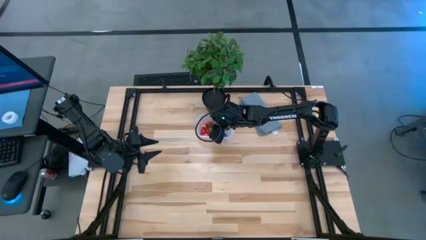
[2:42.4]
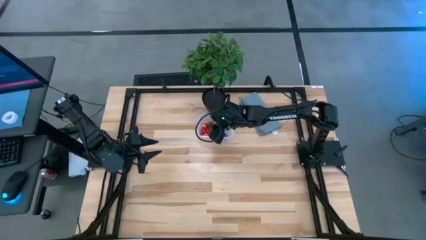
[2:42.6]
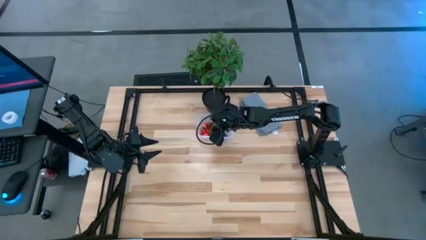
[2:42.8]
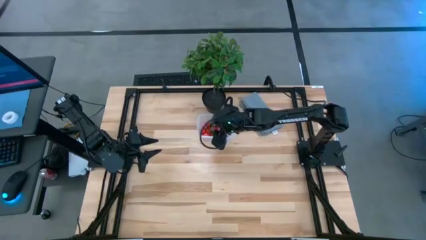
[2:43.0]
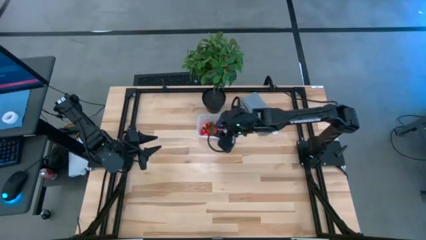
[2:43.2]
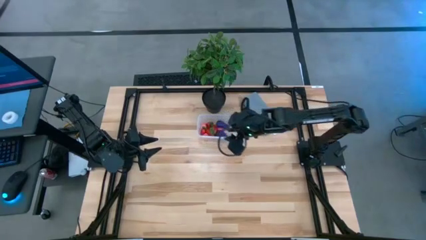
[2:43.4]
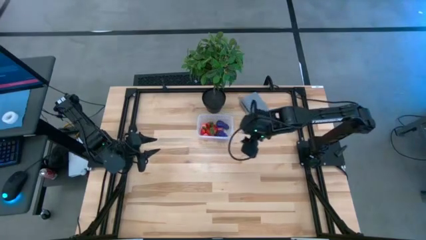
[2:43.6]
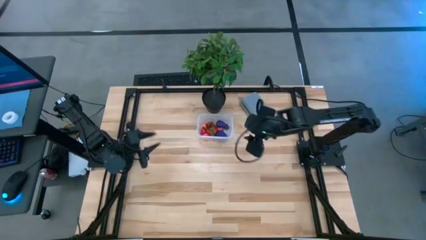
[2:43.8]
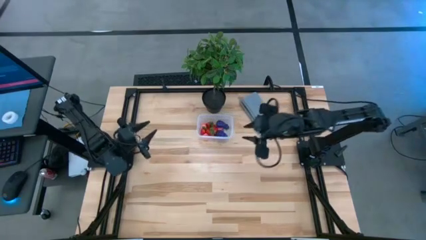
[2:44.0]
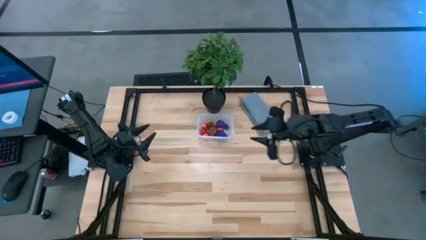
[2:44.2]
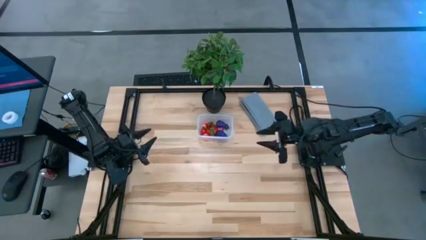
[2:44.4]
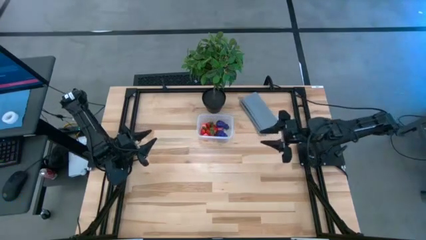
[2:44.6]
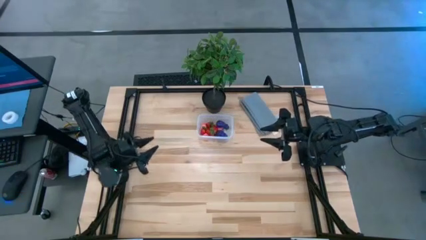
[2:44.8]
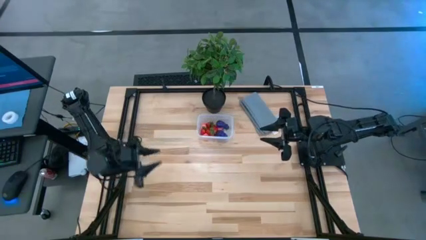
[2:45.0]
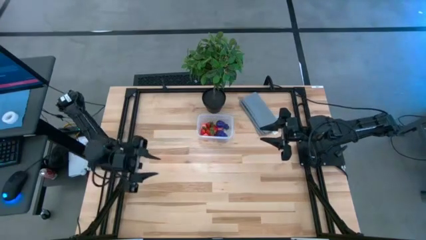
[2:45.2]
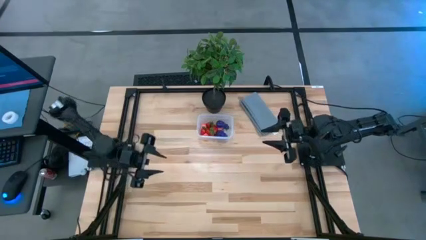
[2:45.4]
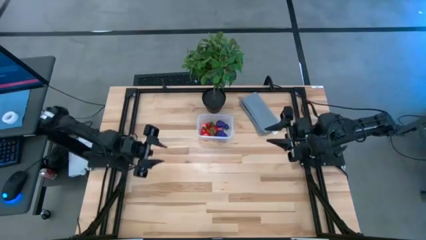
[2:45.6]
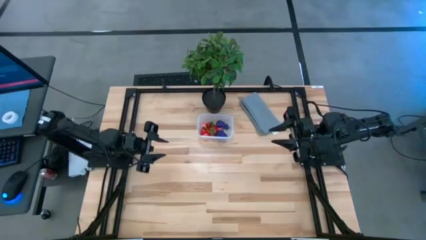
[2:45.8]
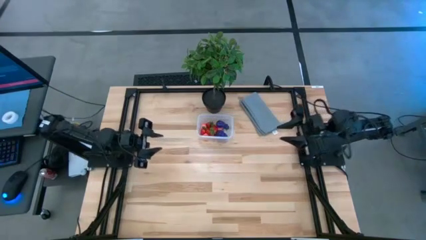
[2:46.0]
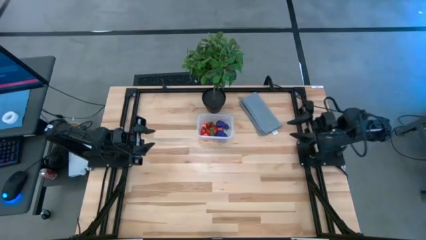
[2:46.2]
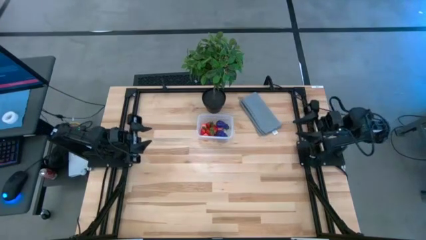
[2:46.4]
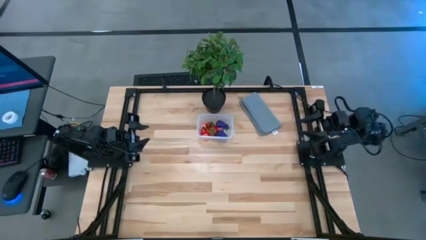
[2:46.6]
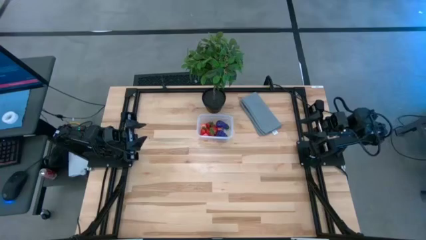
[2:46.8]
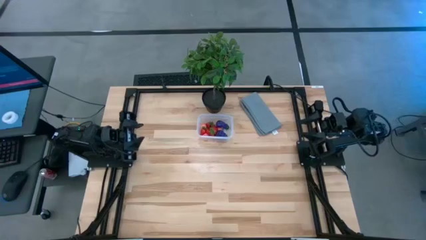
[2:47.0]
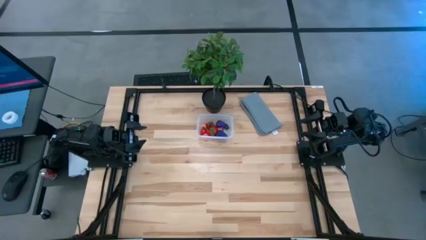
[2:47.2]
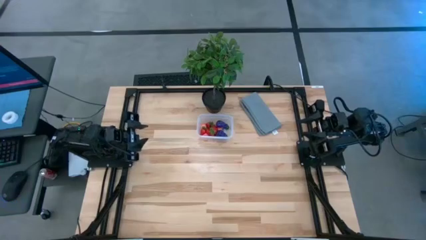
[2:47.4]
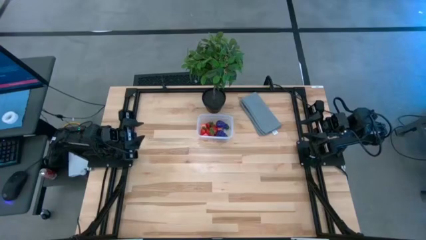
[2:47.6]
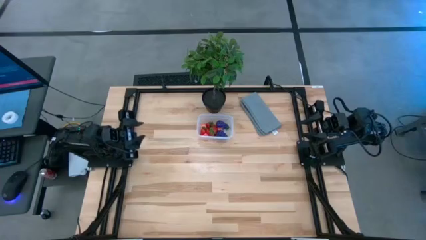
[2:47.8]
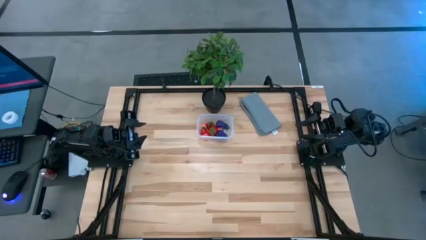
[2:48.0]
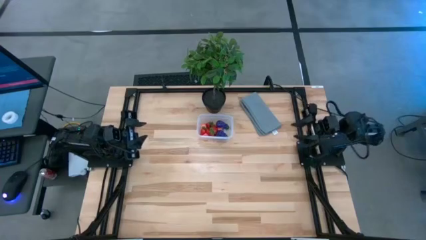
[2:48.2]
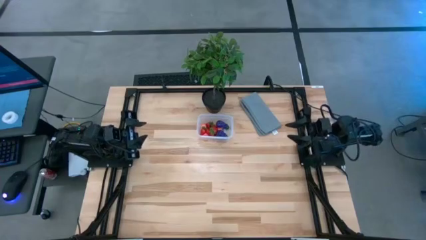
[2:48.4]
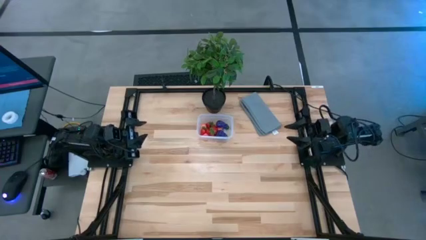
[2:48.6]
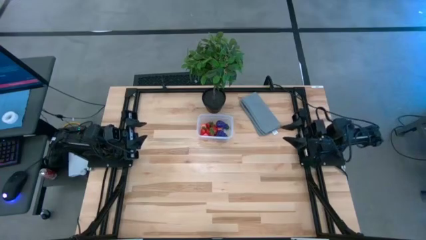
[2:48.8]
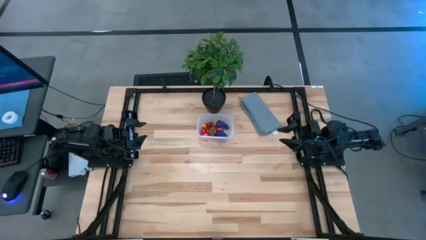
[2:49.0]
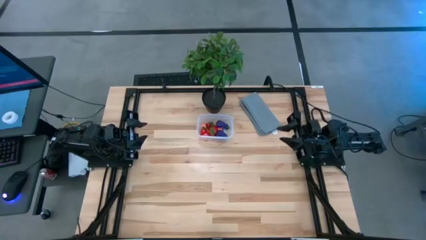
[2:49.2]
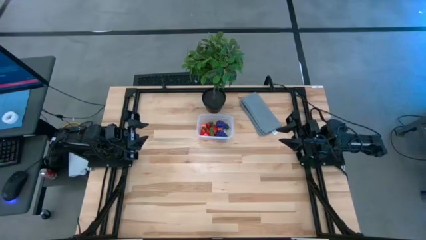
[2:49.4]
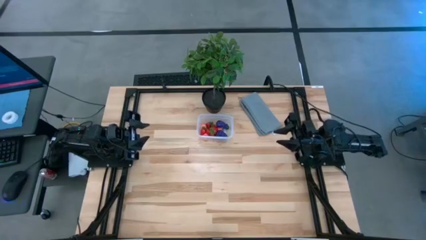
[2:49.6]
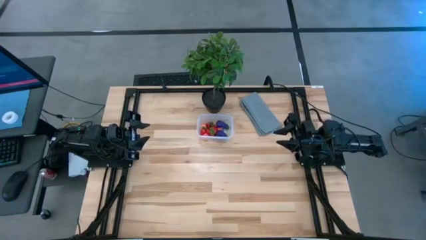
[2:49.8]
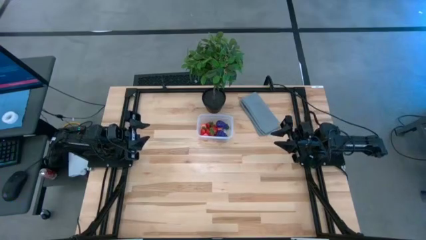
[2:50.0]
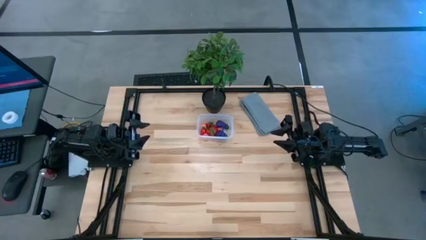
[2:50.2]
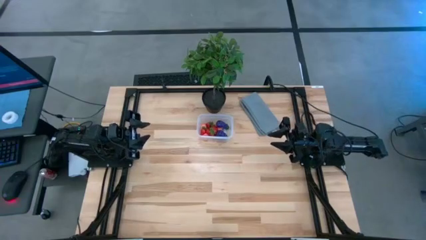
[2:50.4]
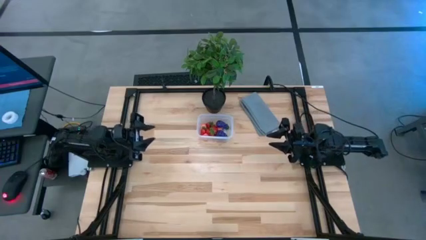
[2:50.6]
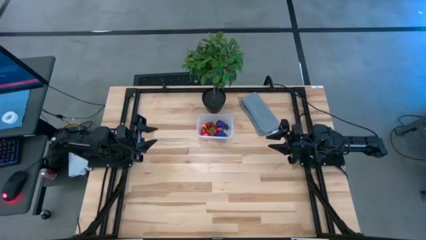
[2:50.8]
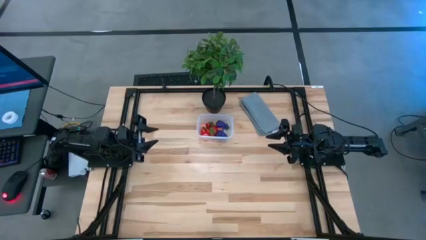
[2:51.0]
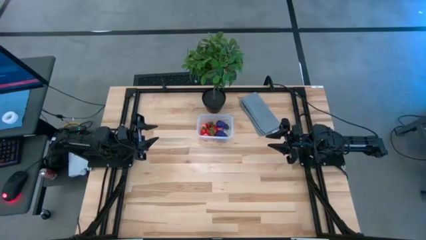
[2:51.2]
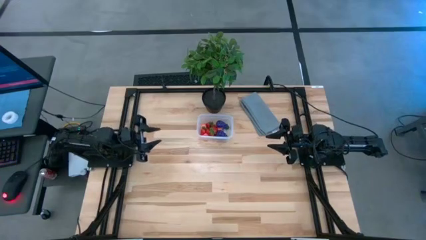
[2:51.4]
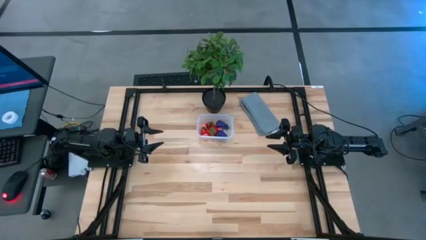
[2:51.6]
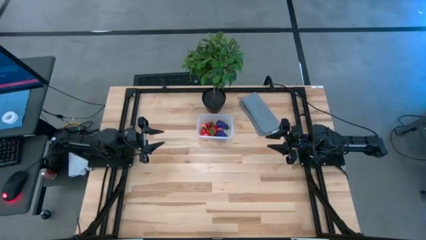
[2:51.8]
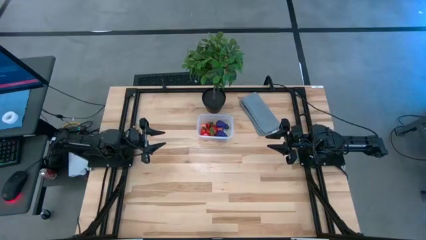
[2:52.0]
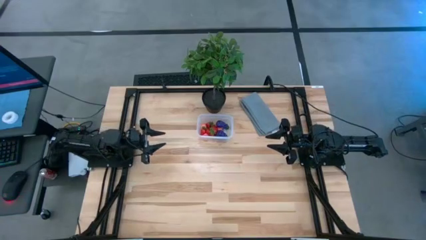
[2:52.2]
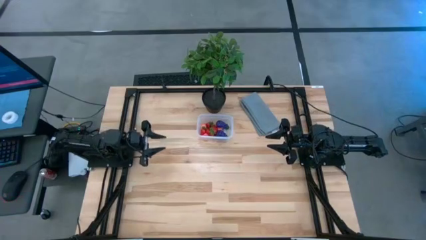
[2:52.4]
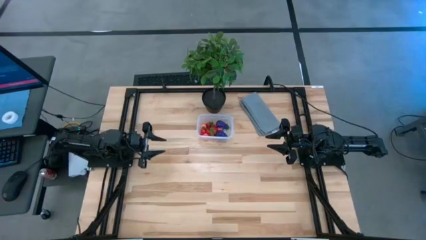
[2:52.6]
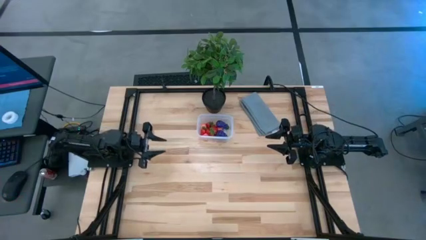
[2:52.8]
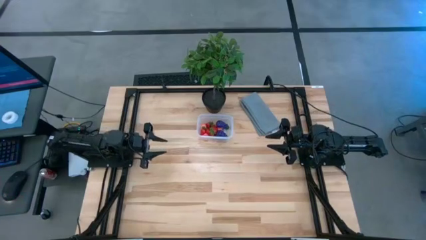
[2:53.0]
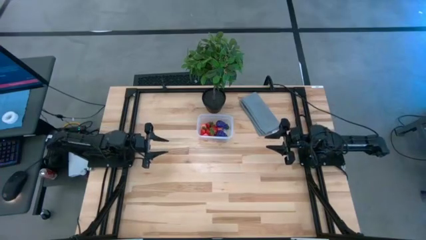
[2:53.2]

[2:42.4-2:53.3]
Task: Pick and placing Produce into tupperware
Return to Home Position

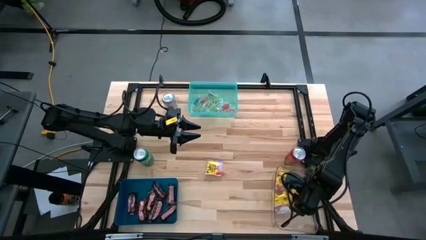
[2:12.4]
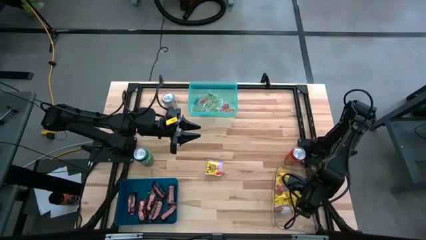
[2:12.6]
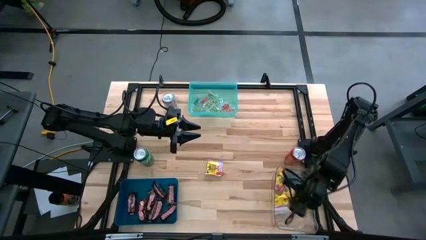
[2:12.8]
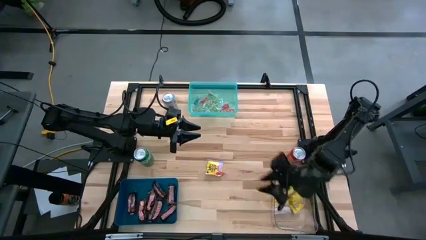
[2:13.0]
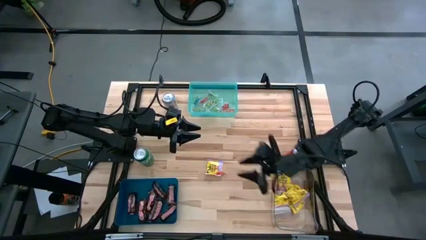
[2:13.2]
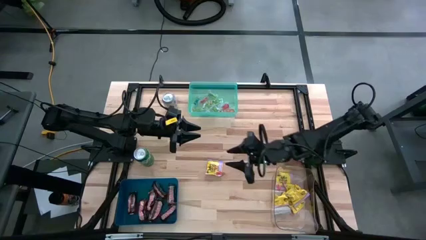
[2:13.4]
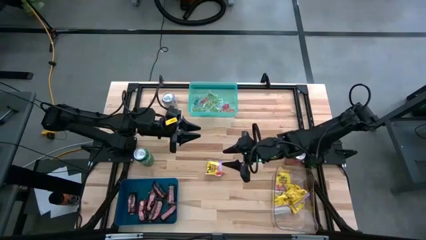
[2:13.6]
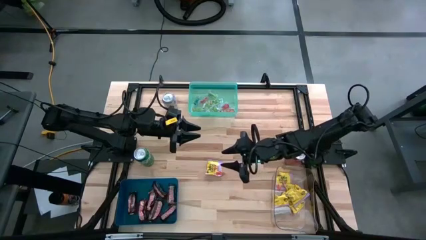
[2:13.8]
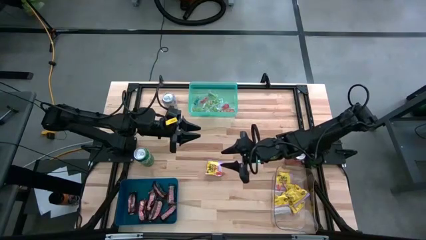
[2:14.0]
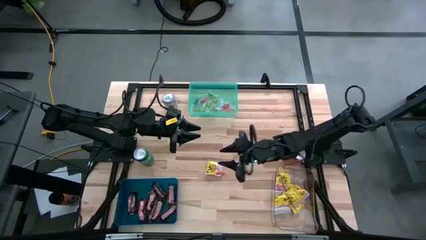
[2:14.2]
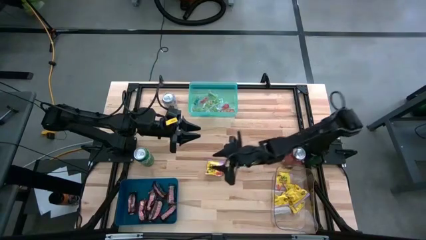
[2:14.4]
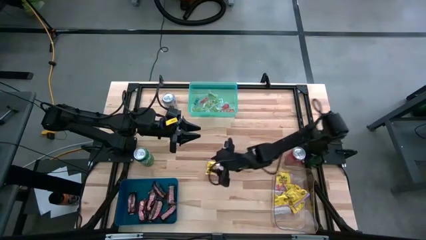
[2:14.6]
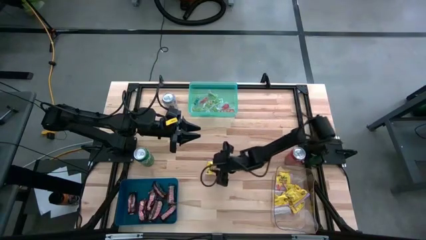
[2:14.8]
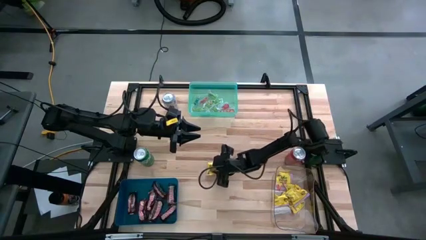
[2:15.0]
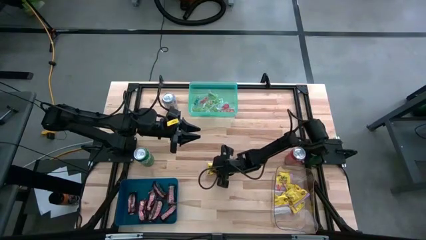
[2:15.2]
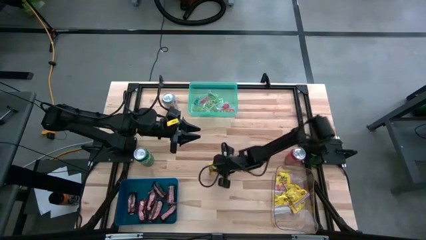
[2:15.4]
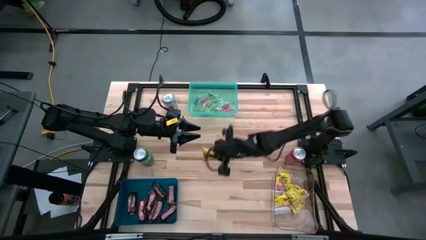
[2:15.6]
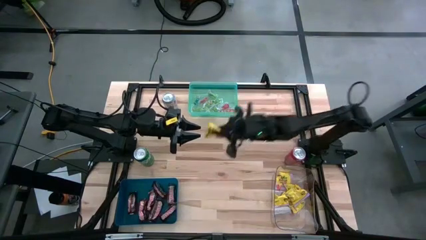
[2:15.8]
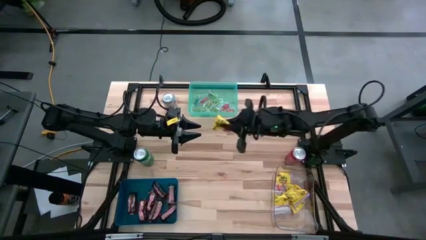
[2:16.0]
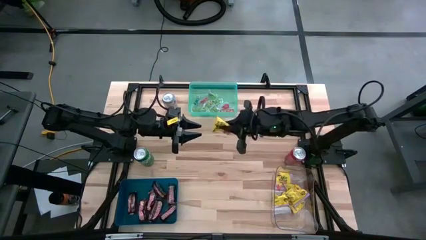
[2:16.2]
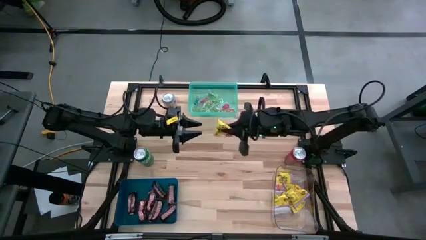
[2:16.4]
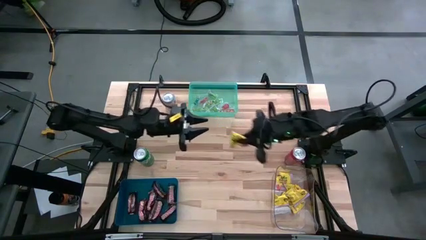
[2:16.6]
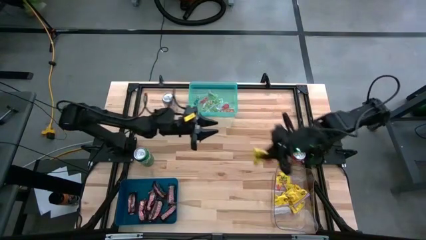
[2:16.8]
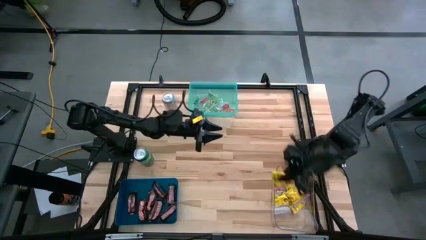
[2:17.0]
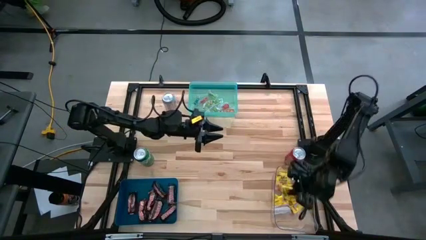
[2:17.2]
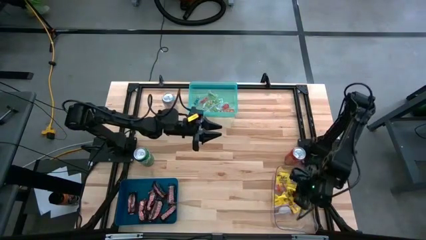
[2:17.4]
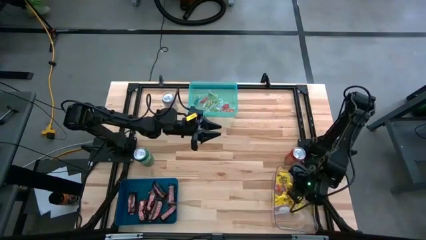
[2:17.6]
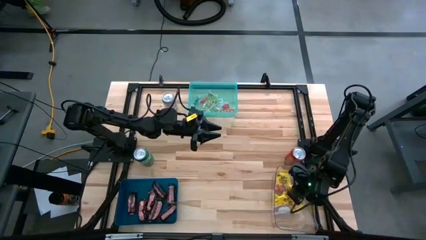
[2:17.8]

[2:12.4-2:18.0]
Task: Sort candy
Put the yellow candy into the transparent bin
